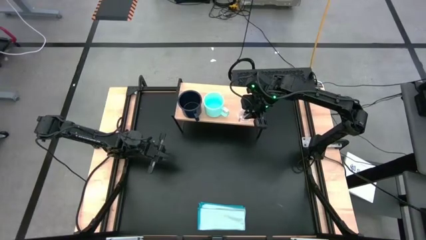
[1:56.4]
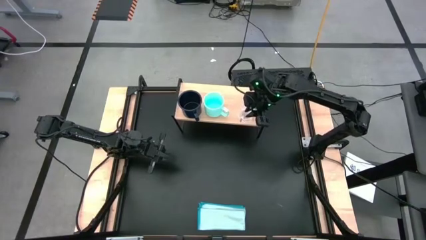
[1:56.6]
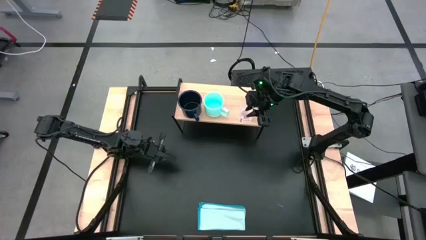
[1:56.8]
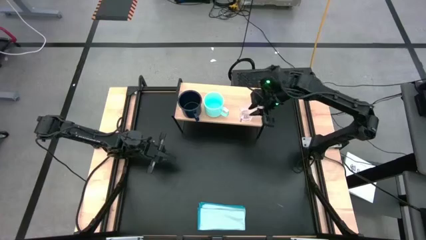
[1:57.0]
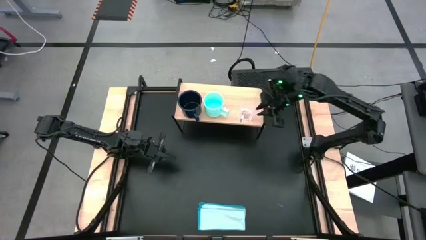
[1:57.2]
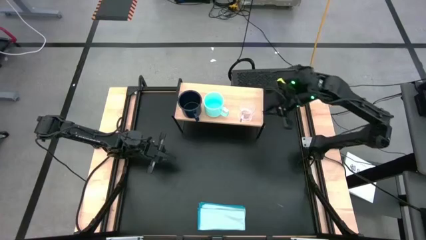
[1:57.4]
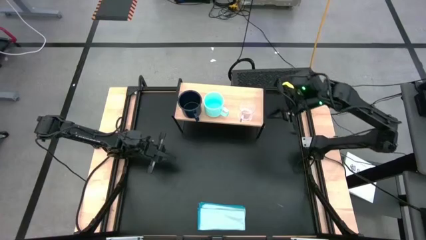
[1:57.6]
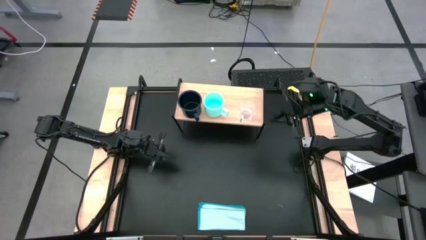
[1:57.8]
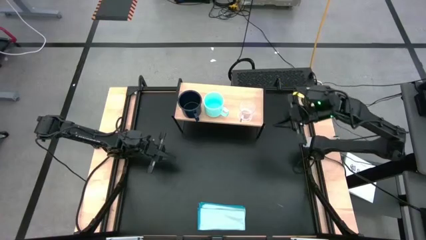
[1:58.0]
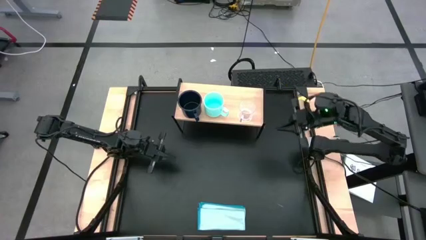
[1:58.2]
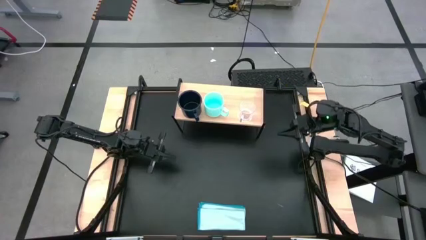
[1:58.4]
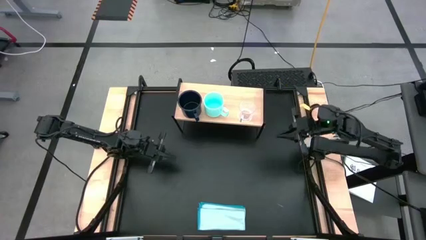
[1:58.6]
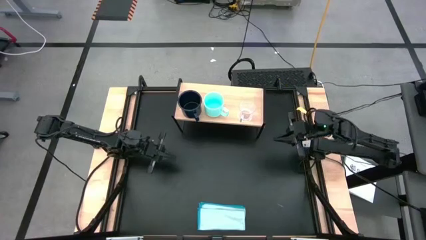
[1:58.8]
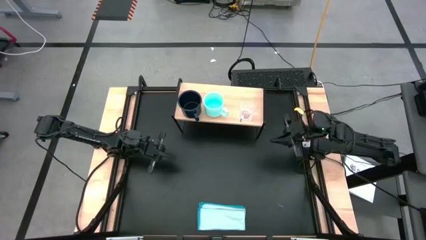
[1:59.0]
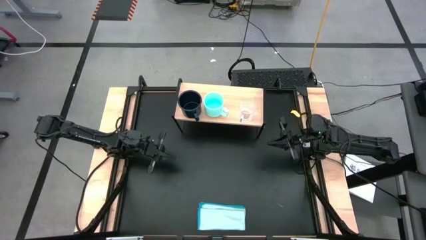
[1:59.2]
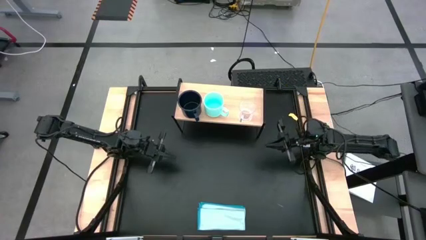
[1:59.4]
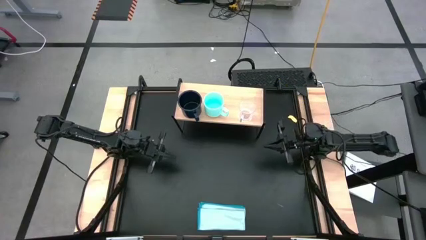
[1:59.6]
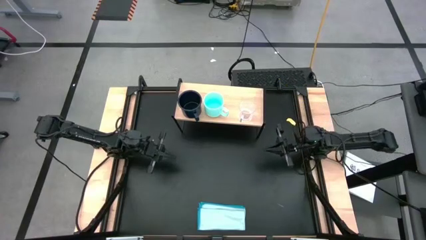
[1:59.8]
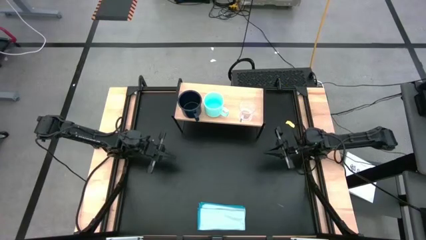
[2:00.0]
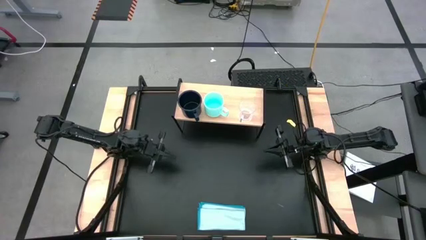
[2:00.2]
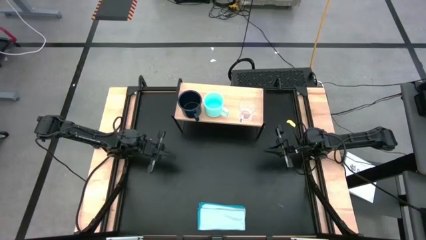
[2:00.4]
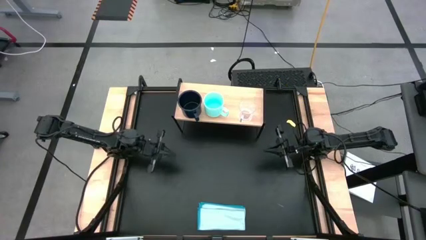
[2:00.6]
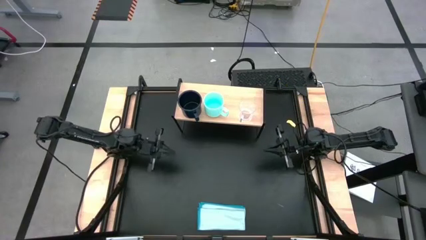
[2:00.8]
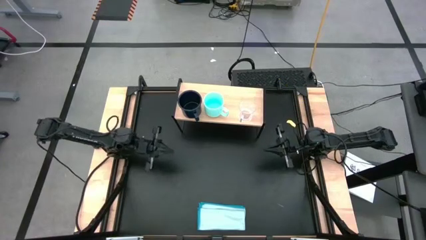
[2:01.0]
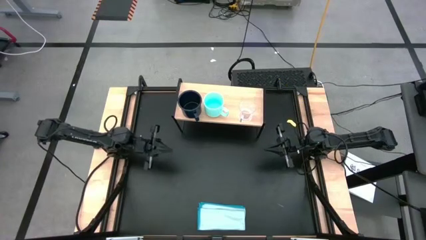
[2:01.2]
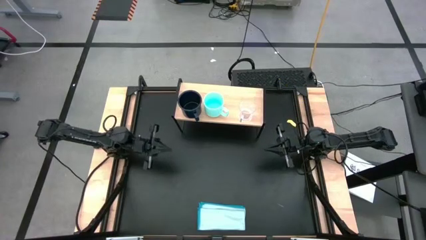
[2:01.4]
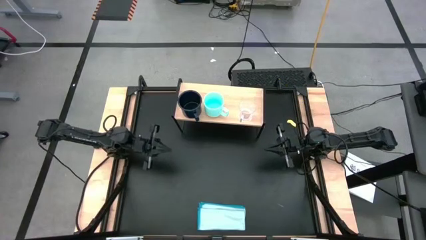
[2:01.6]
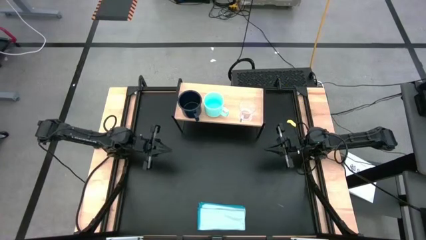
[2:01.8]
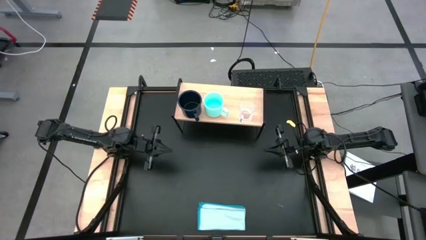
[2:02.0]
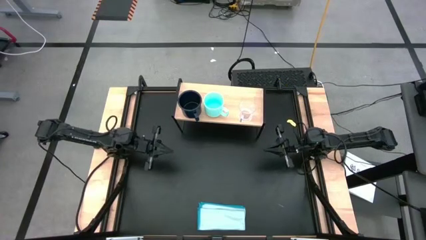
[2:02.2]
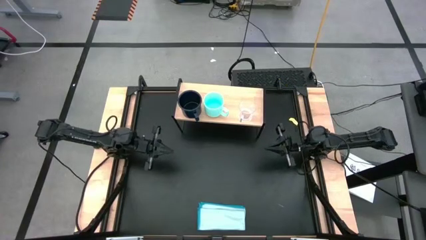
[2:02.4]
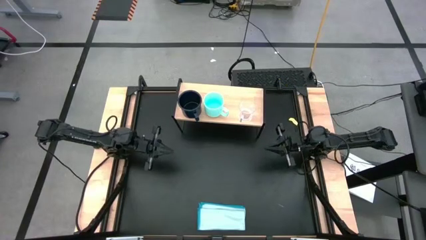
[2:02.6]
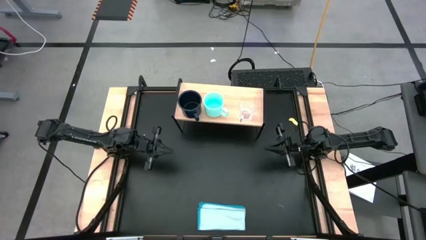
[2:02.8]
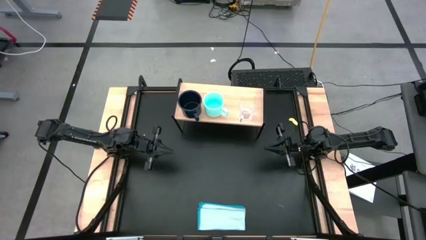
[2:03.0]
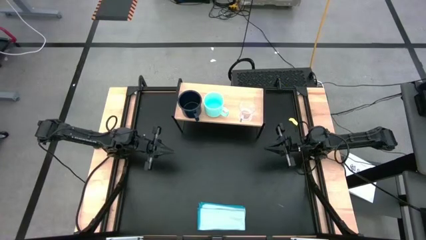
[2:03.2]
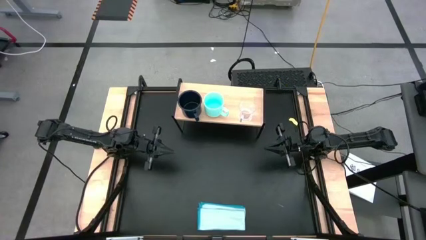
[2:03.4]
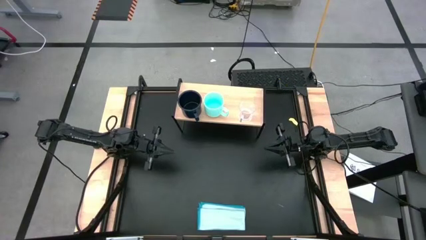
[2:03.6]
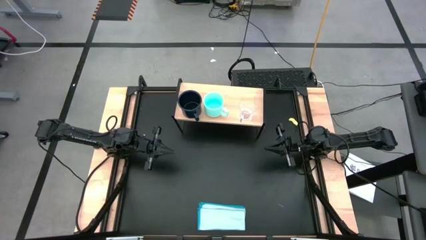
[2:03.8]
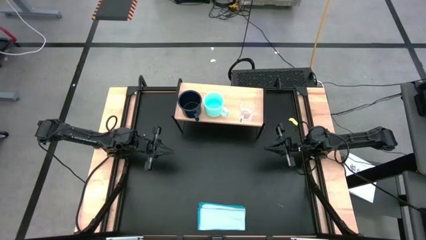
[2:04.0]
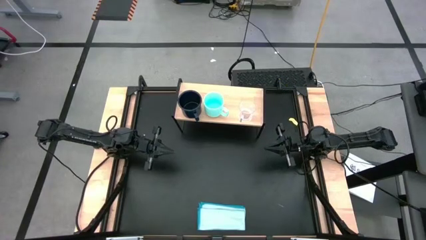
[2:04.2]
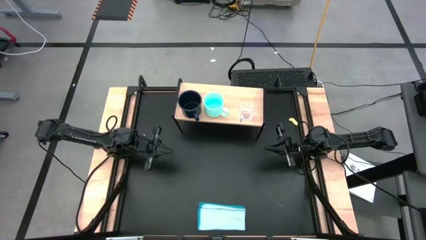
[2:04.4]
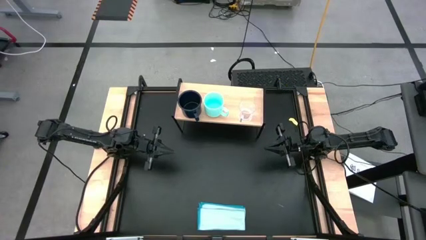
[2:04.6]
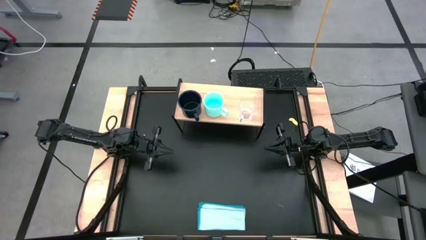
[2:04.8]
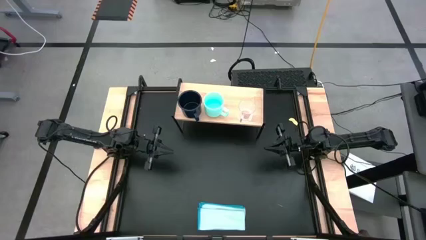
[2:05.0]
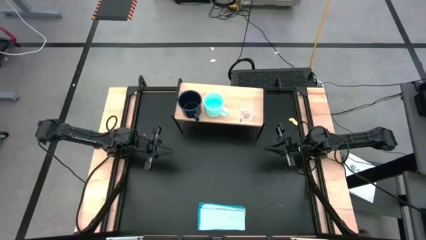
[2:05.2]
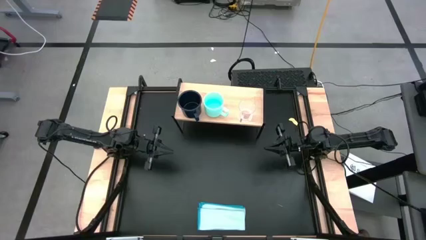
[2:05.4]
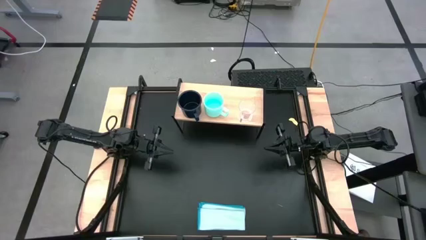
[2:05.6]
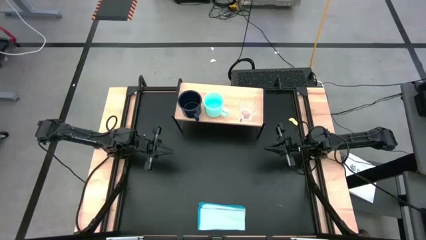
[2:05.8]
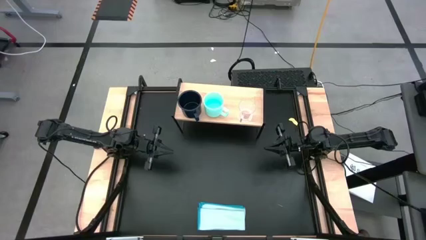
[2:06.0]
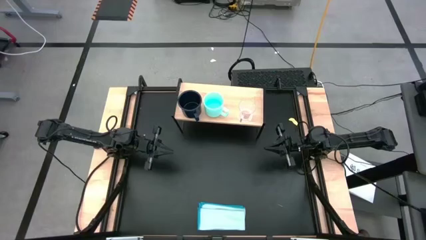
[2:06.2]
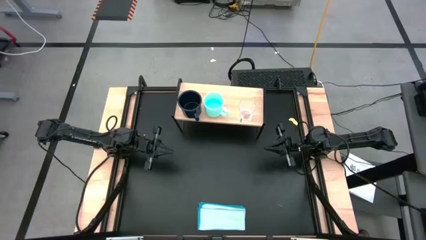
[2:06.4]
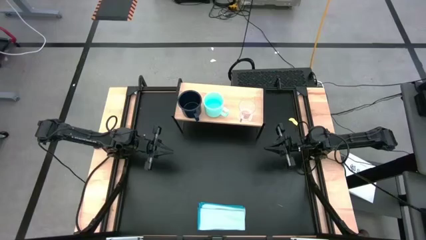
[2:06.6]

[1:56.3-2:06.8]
Task: Stack small to large cups/mugs on shelf
Return to Home Position

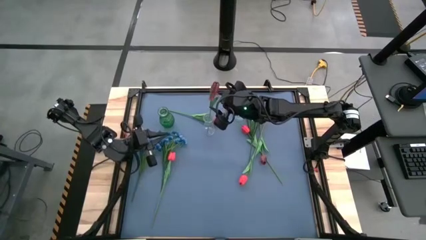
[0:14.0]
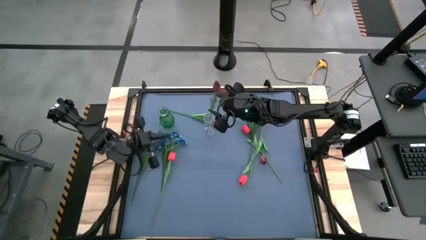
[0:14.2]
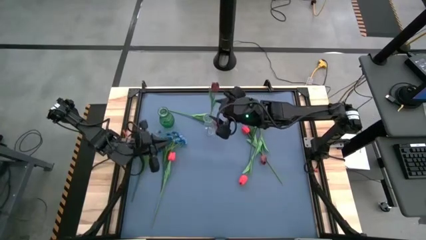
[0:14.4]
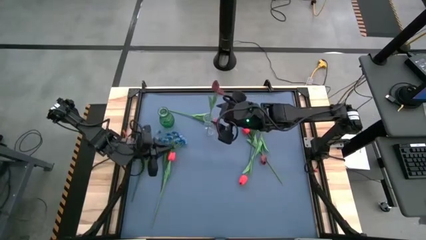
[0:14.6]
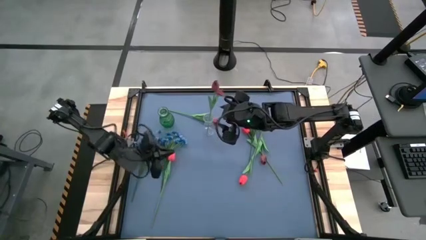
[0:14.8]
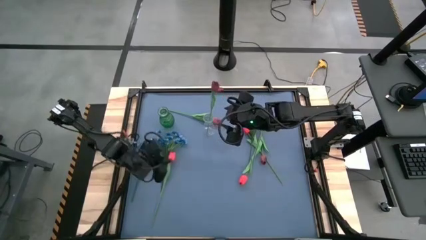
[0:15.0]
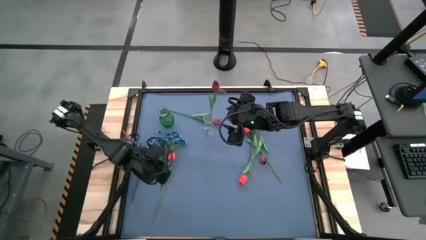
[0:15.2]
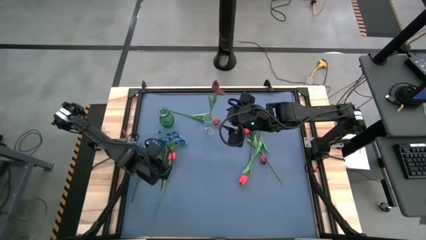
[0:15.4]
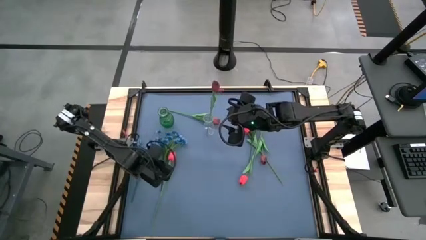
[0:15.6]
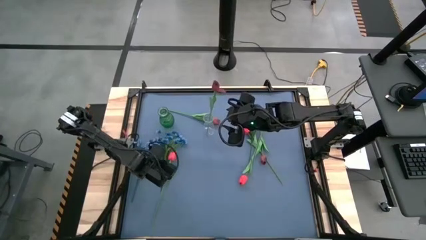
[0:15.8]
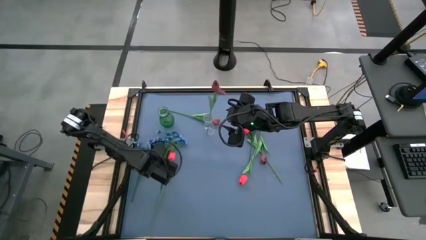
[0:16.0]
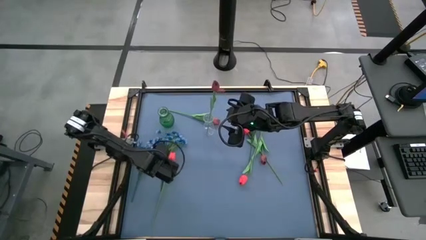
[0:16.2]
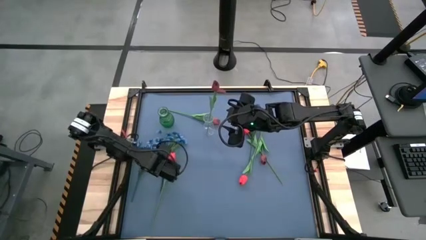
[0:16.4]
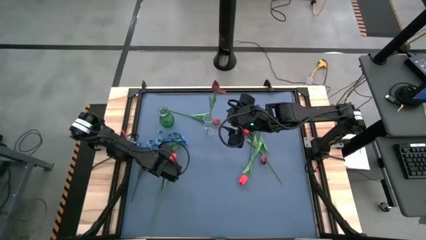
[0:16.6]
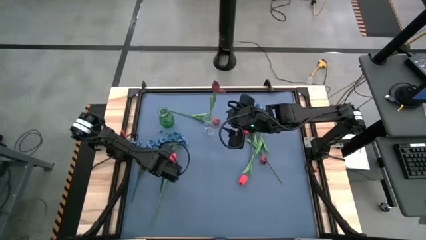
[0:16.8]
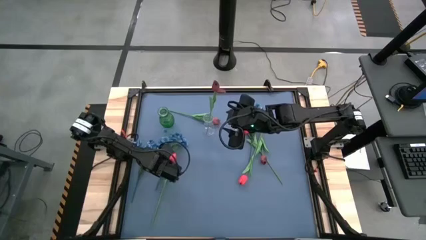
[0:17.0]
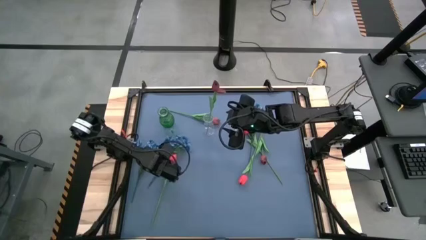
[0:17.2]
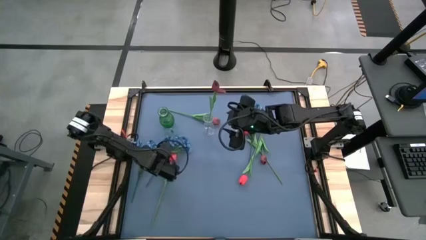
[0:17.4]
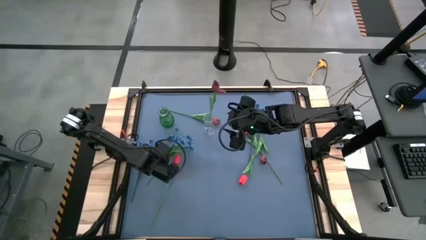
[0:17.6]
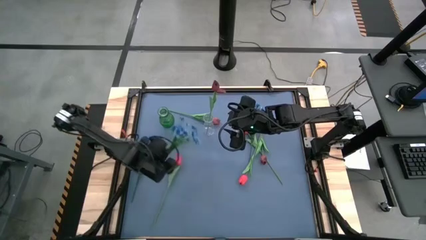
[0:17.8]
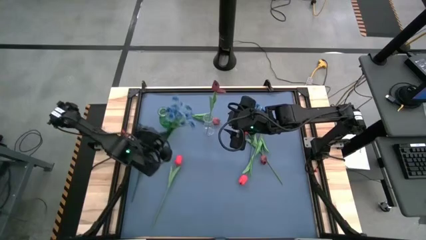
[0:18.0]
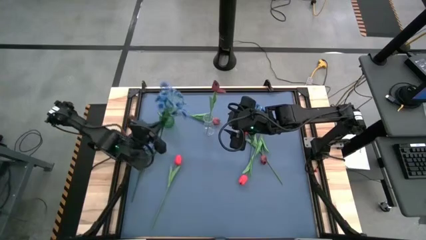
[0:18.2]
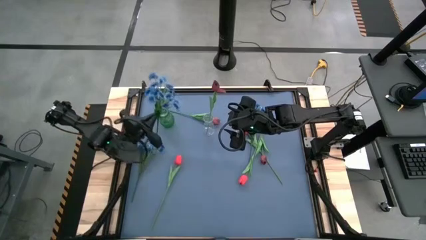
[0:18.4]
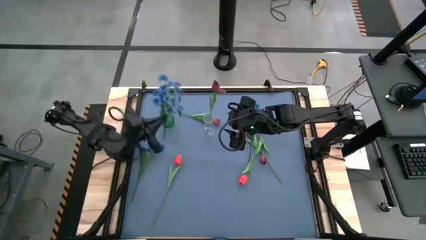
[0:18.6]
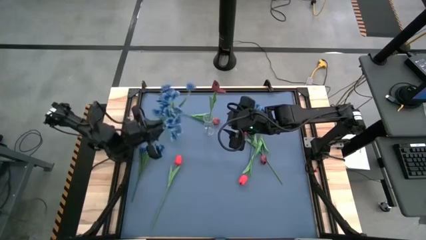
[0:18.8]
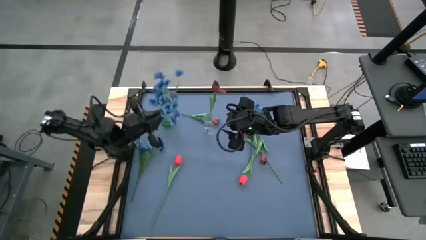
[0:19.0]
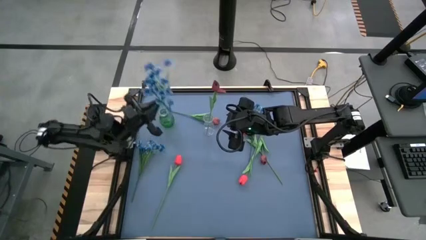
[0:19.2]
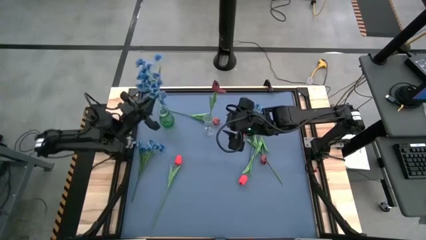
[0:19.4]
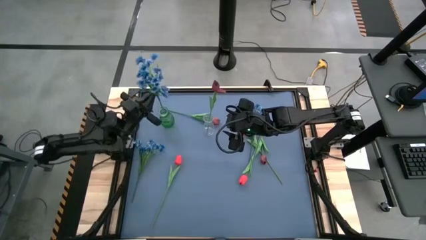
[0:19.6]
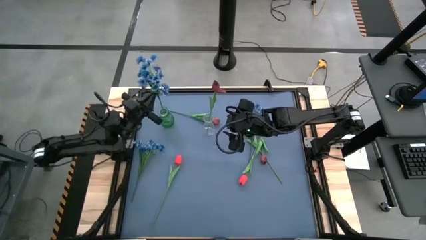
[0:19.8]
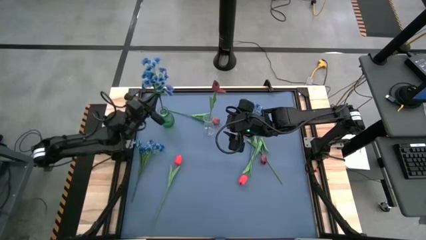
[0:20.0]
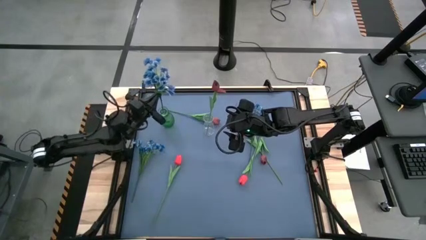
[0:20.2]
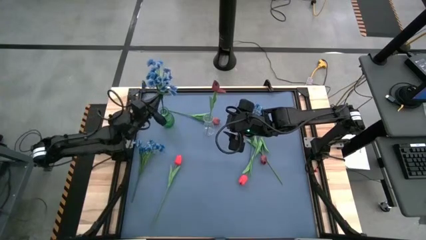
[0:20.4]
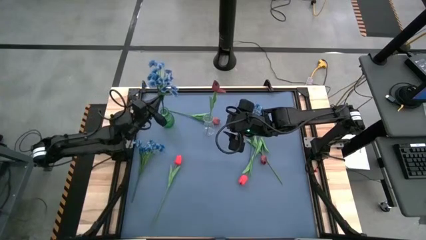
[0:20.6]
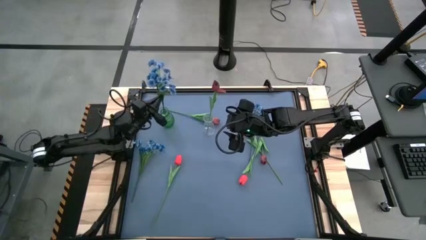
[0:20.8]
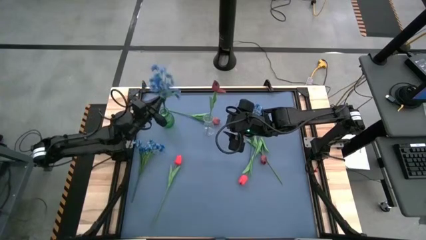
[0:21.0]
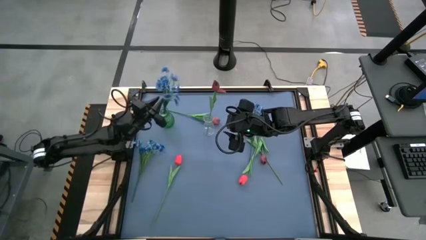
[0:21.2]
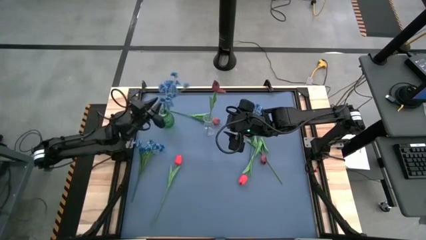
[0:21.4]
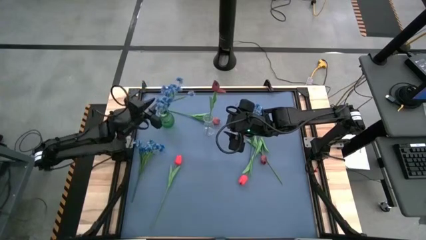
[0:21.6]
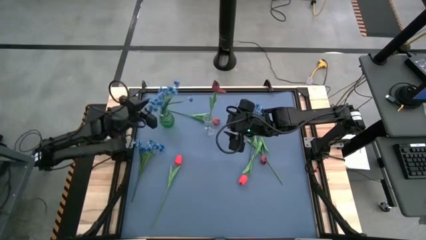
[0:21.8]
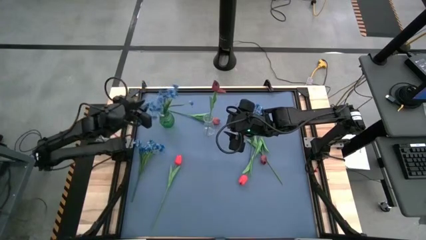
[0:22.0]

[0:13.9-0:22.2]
Task: Sort flowers into vase by color
Put the right blue flowers into the green vase
